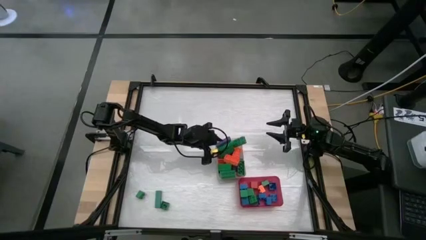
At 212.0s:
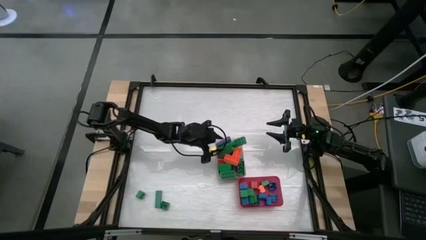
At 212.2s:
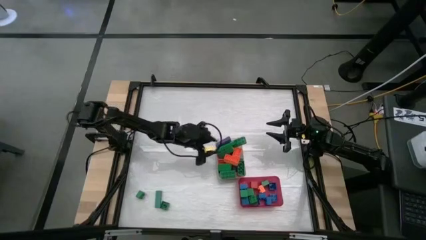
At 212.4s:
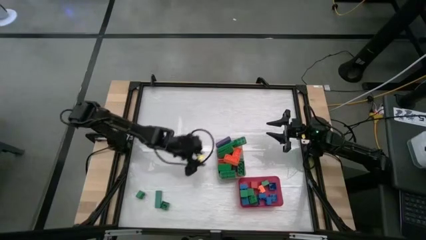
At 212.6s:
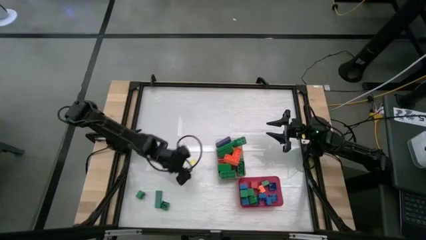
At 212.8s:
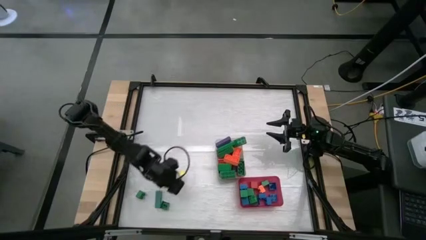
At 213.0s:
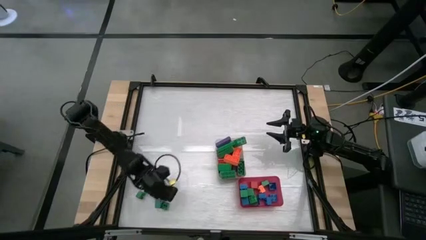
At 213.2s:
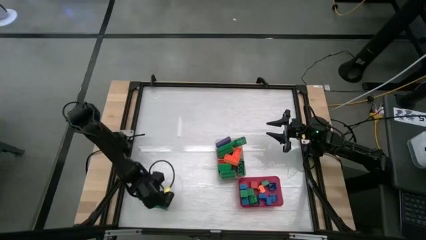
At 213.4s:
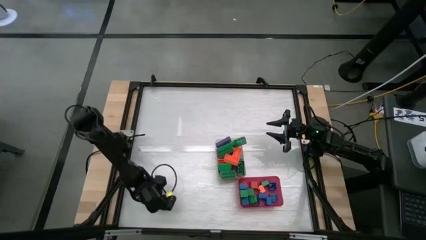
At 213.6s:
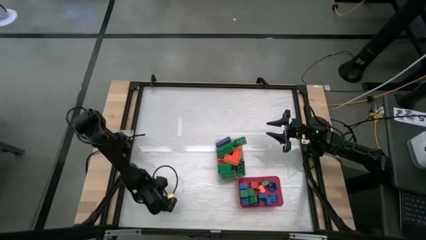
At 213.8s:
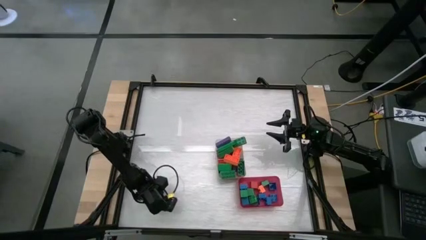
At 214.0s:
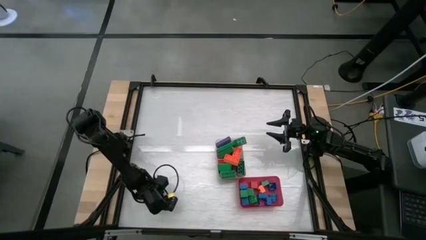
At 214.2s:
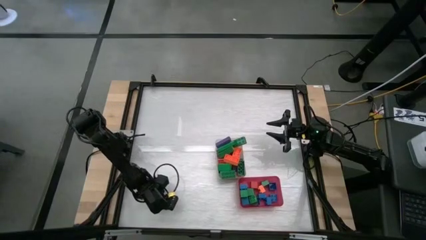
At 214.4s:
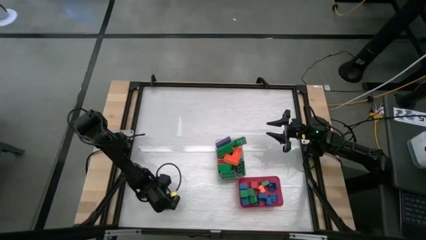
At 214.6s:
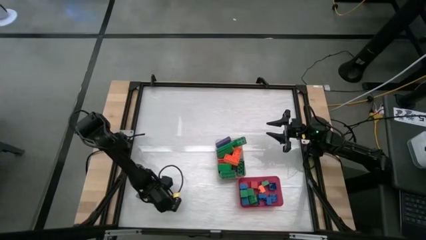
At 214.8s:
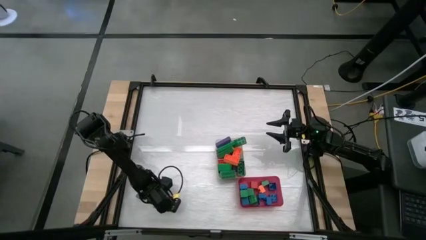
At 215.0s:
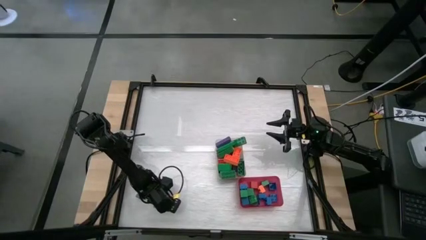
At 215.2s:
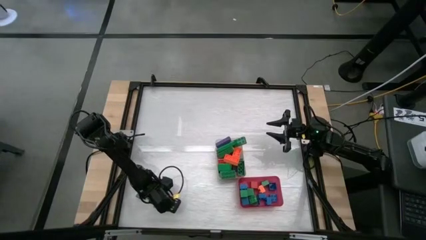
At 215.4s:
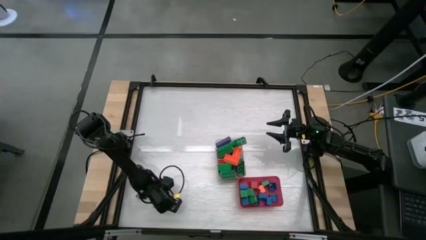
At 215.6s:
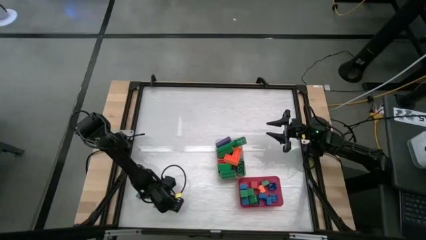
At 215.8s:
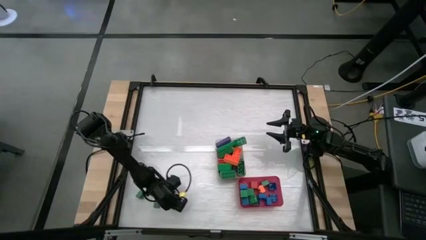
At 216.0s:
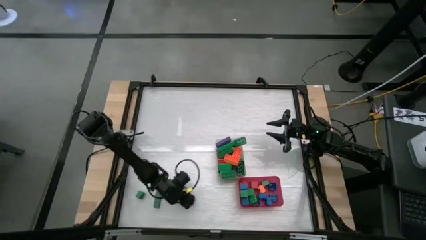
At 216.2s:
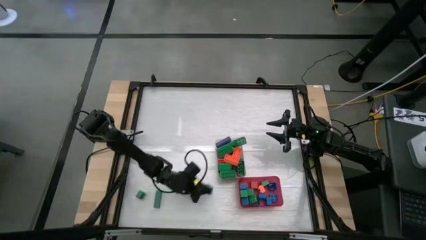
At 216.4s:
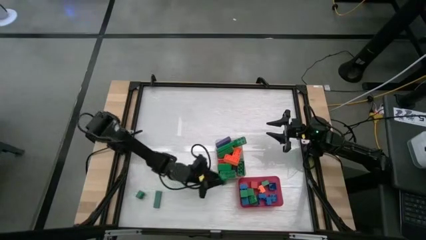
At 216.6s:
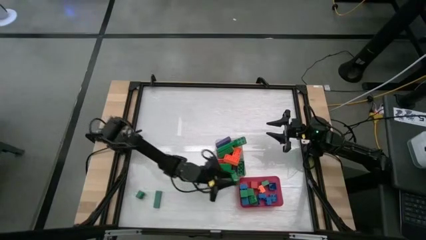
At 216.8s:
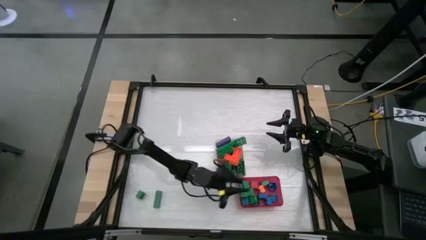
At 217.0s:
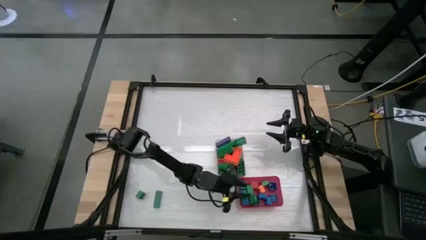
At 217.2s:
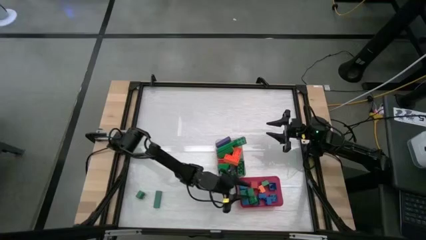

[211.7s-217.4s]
Task: Sort blocks by size
Put the green square game piece into the red bin

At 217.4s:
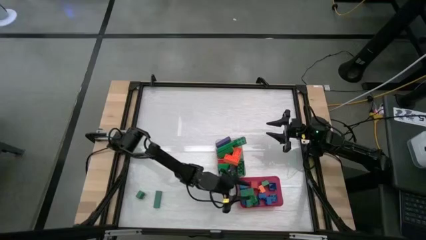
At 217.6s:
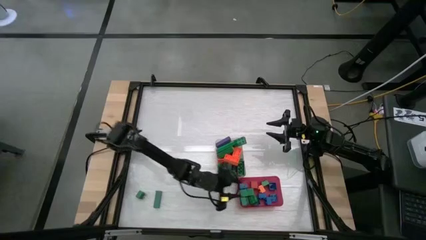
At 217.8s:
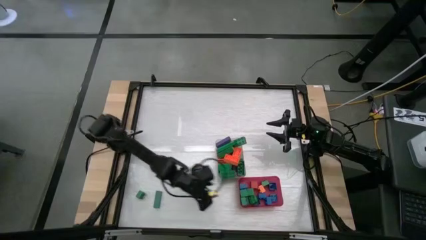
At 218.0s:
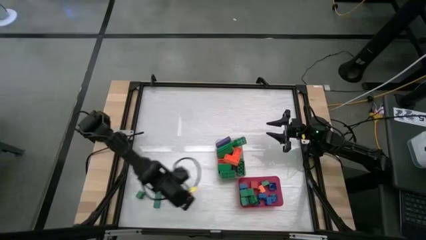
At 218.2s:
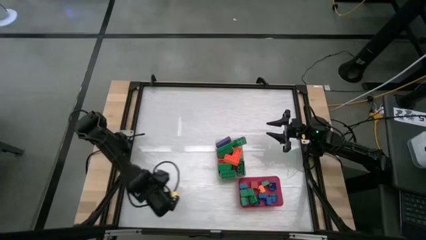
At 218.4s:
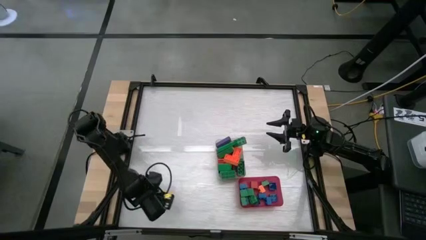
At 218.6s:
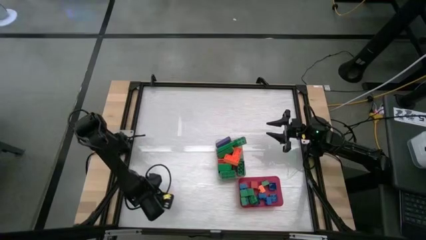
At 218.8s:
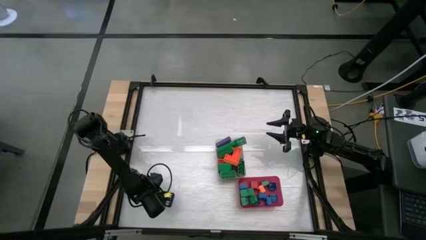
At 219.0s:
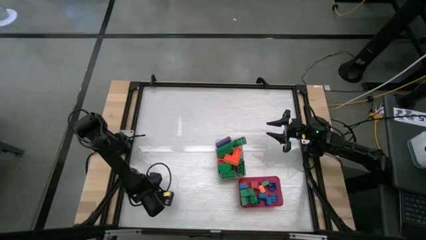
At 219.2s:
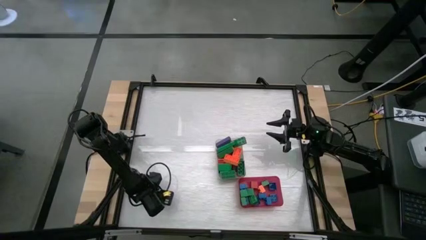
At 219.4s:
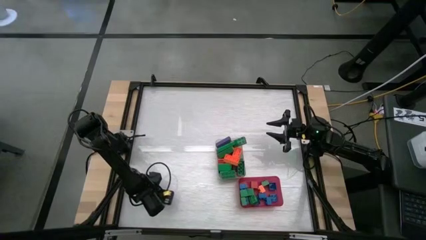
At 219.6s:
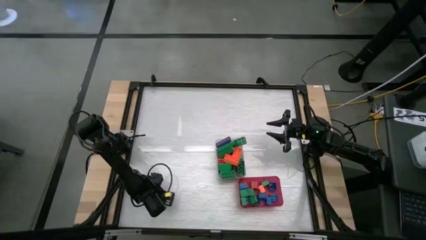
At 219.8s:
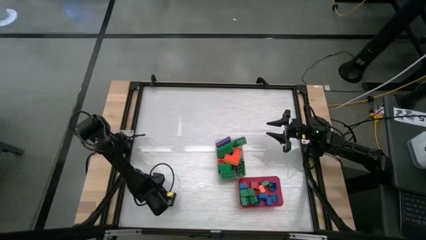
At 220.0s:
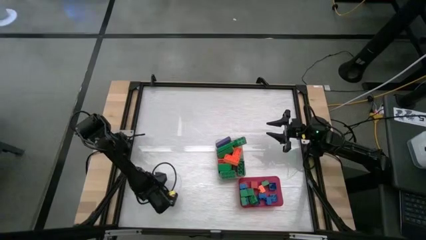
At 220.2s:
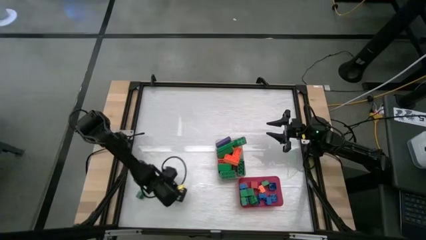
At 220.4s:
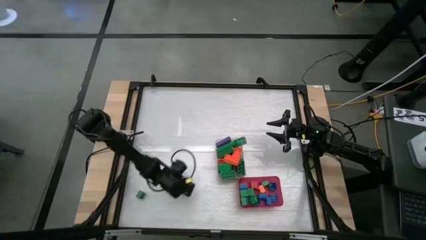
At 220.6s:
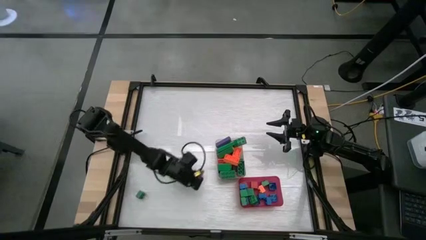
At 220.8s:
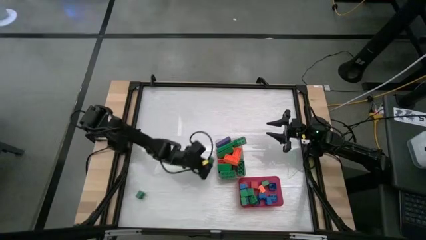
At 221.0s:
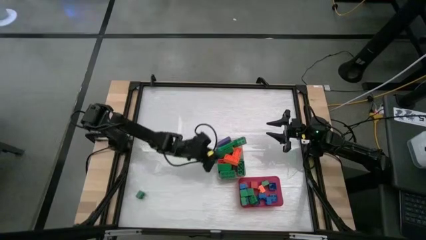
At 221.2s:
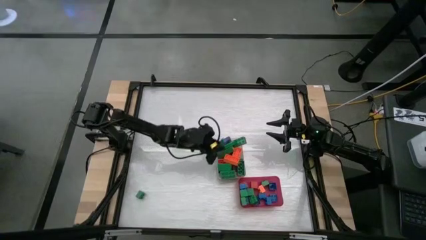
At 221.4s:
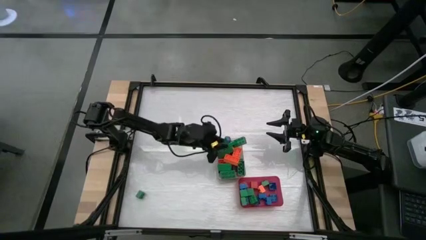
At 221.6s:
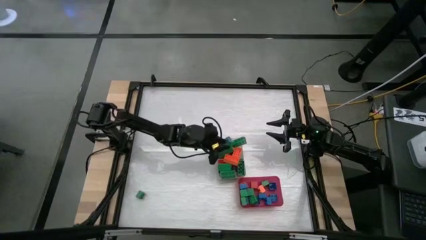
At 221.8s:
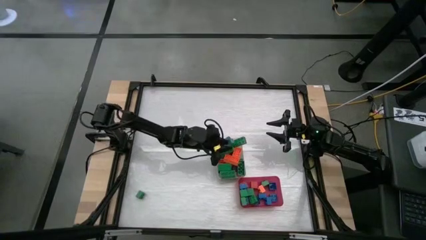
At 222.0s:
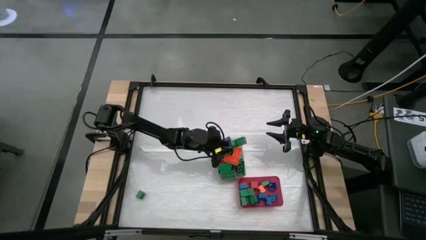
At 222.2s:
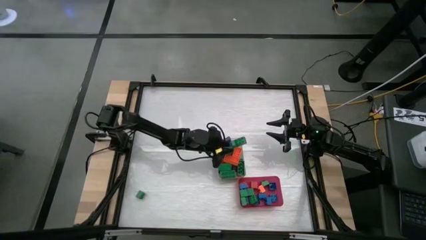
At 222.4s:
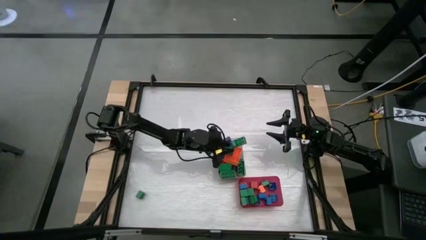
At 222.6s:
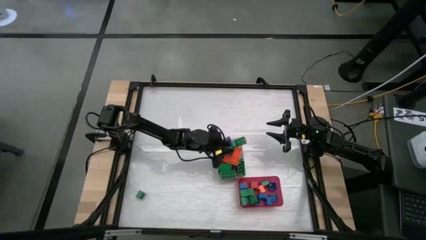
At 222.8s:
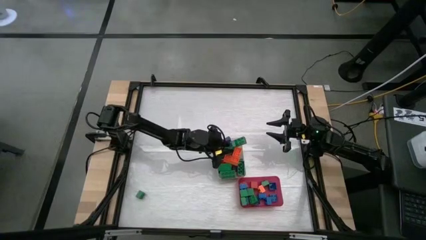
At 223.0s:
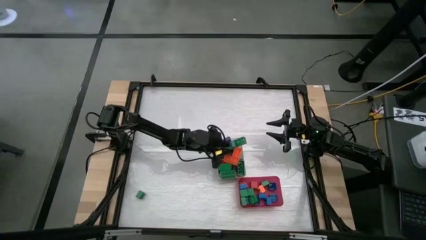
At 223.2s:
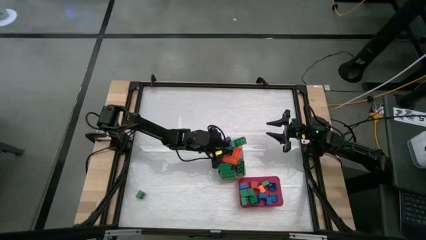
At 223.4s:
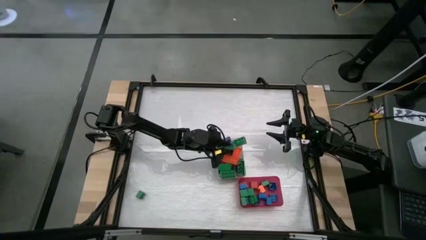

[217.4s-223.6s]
Put the green rectangular block into the transparent bin

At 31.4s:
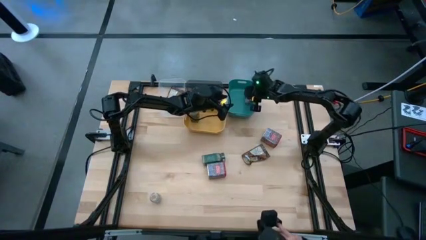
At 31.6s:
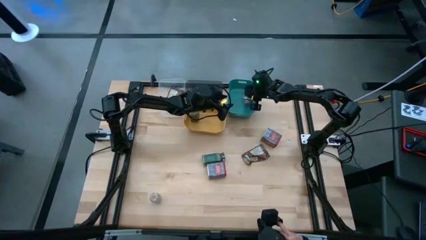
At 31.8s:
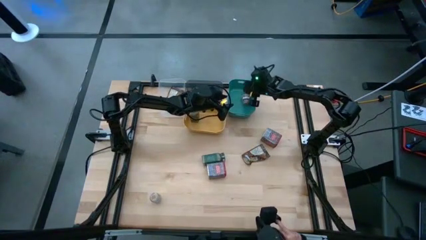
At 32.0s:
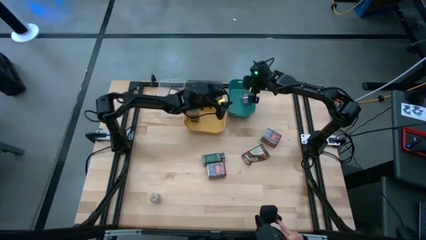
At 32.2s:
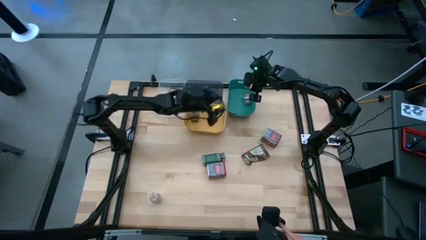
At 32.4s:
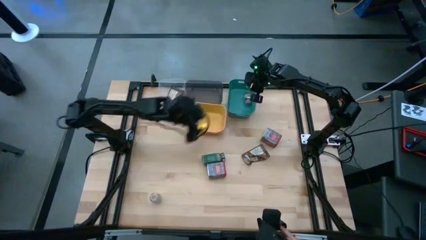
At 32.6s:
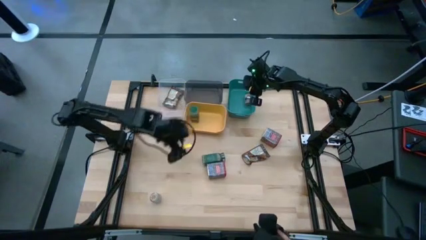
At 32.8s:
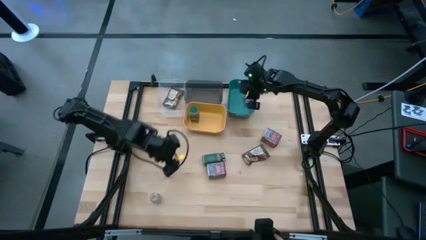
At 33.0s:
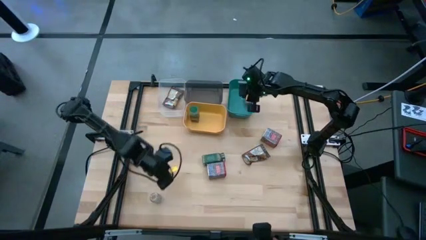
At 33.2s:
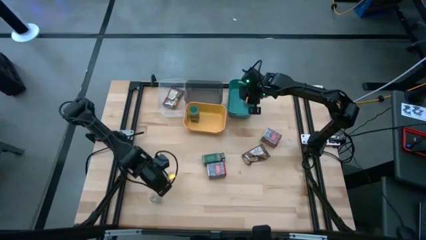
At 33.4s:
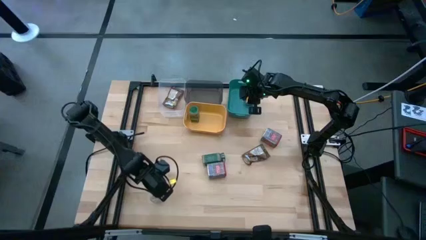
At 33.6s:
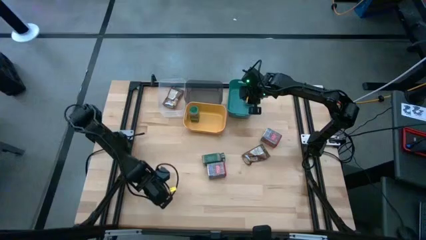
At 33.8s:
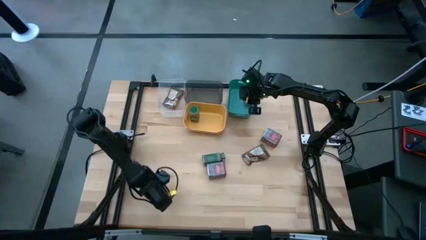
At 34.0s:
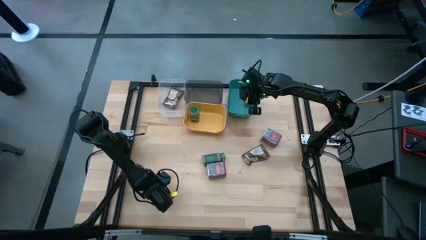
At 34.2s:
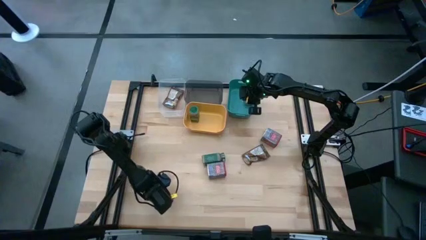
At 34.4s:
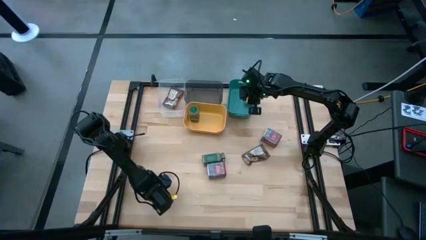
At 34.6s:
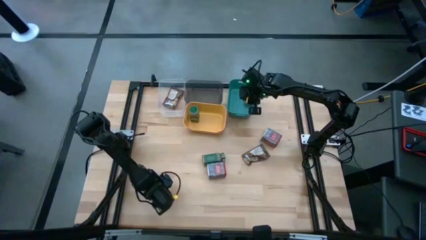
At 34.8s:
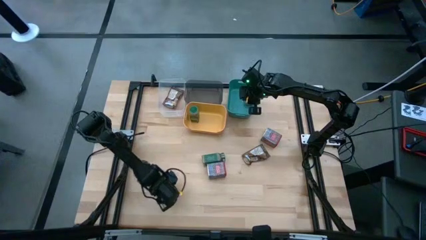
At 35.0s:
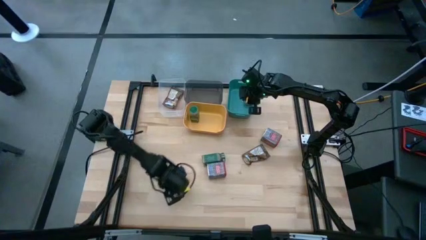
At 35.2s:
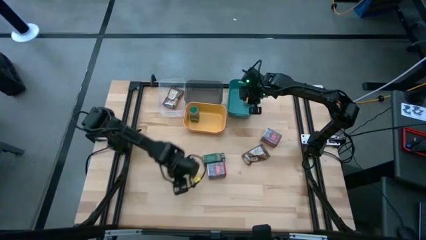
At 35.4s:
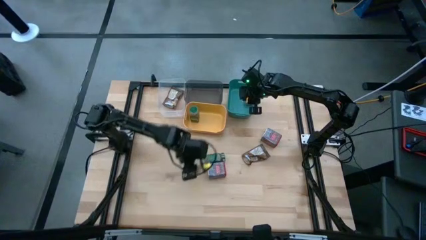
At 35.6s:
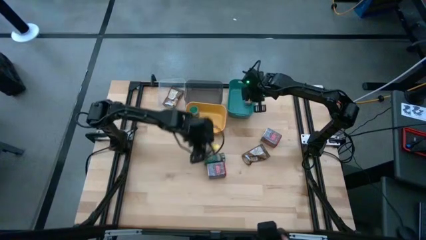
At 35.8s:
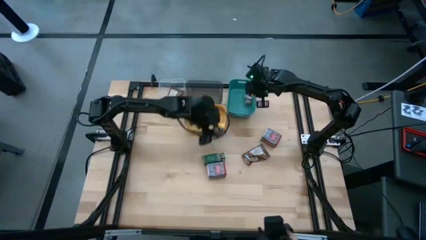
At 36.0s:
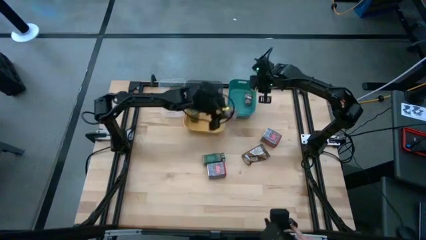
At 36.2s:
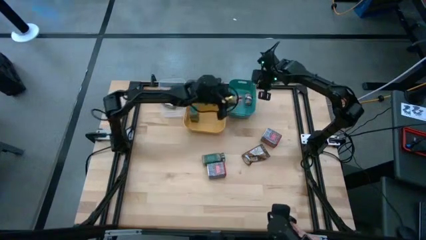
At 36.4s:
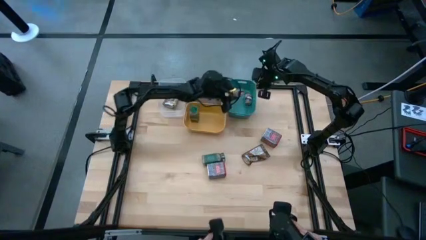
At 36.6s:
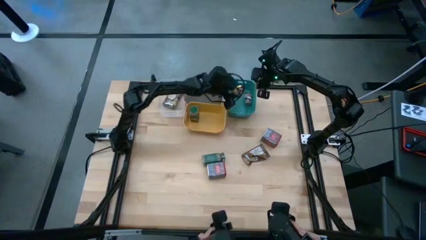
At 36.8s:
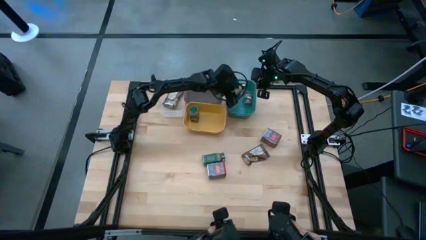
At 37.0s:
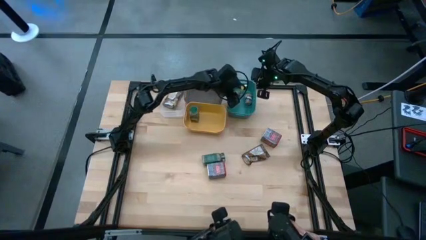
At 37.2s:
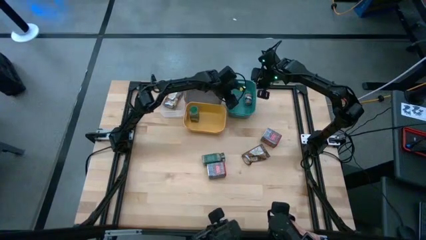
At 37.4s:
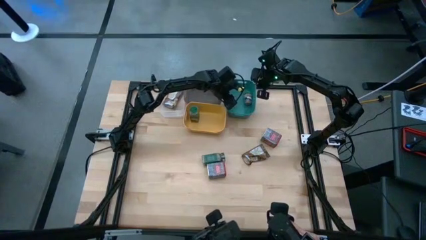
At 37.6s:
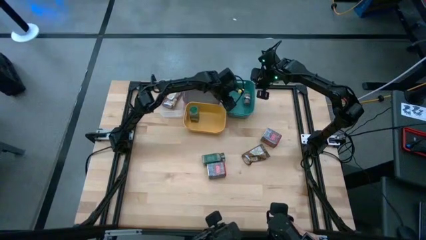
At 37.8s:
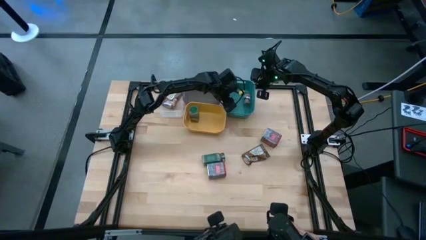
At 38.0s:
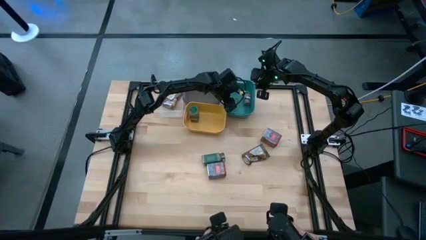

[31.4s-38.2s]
Task: Sort spices by type
Put the brown seasoning bottle into the blue bin
